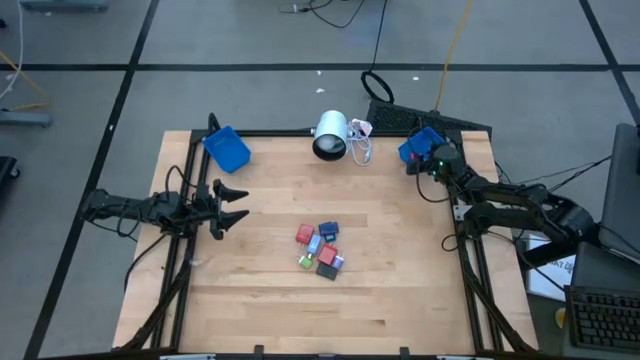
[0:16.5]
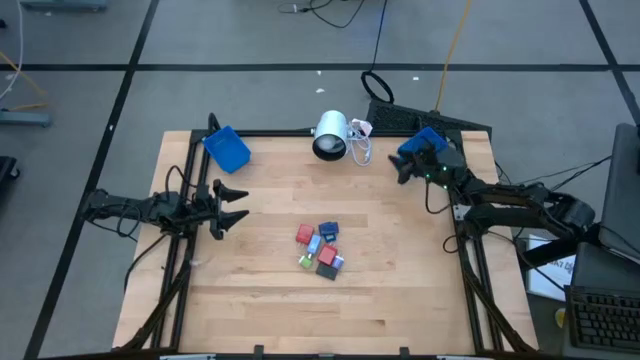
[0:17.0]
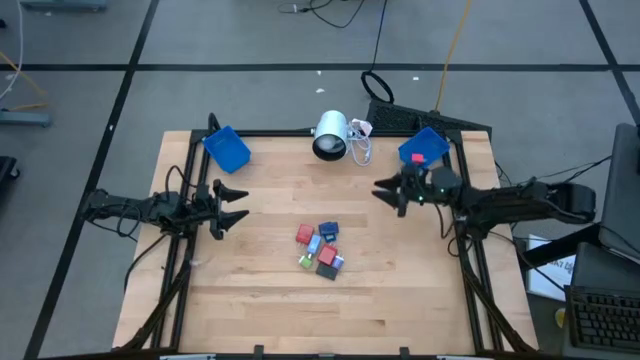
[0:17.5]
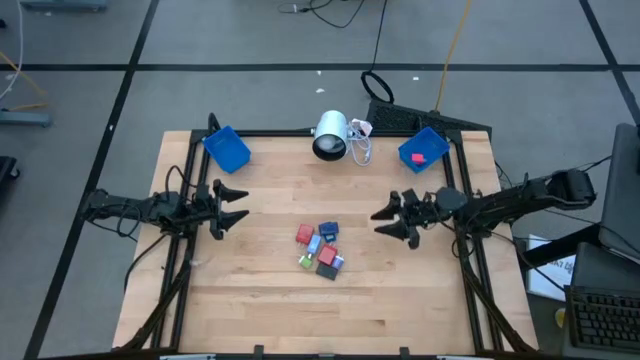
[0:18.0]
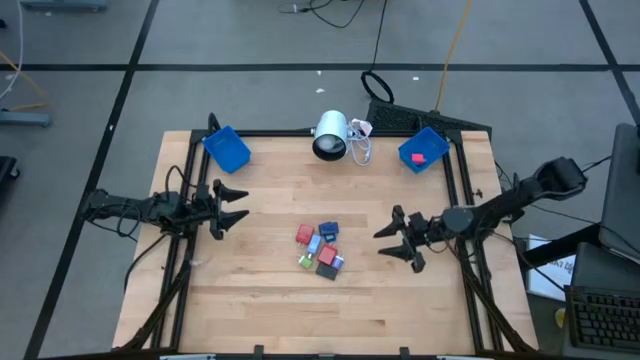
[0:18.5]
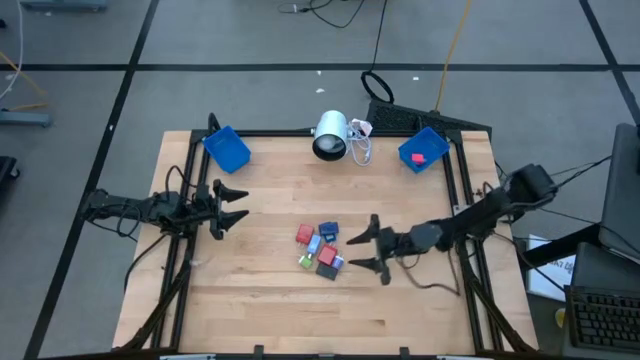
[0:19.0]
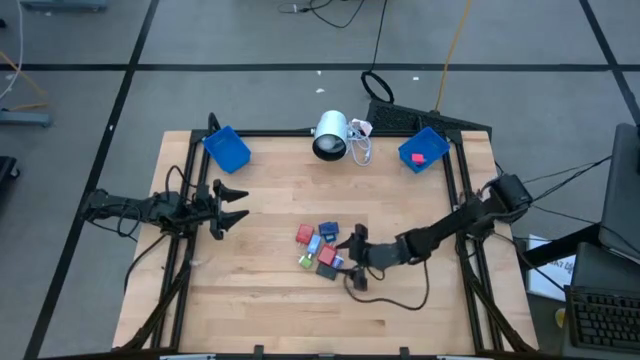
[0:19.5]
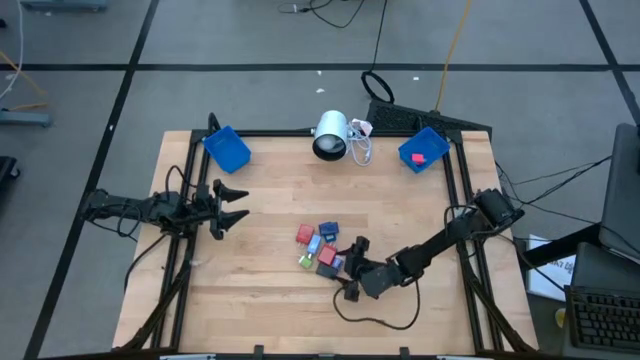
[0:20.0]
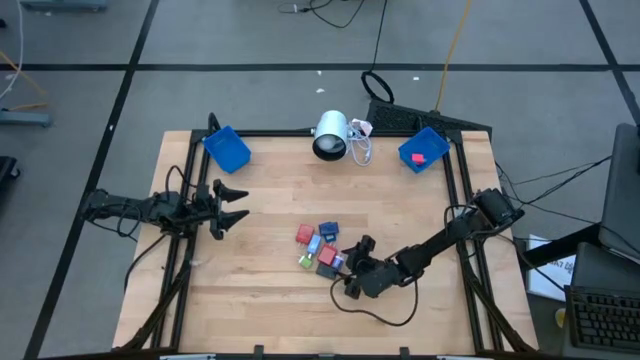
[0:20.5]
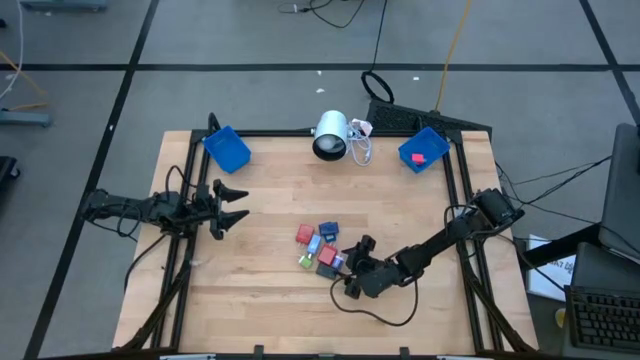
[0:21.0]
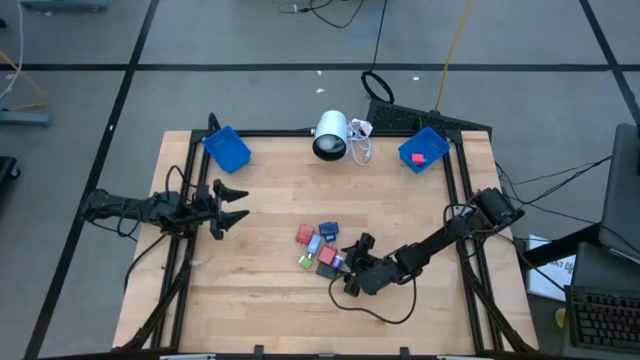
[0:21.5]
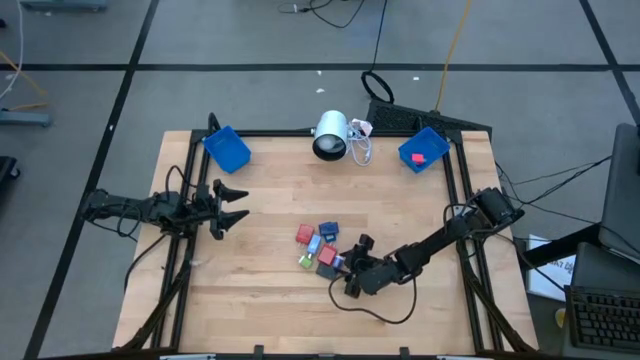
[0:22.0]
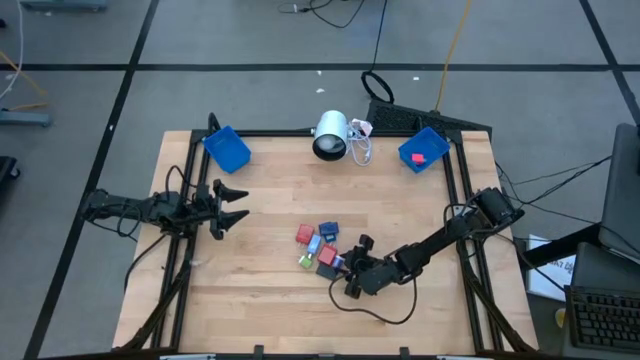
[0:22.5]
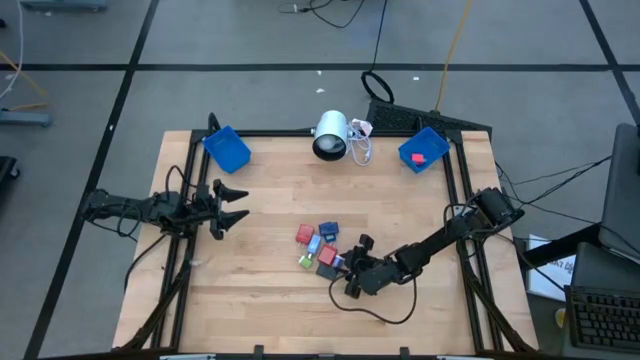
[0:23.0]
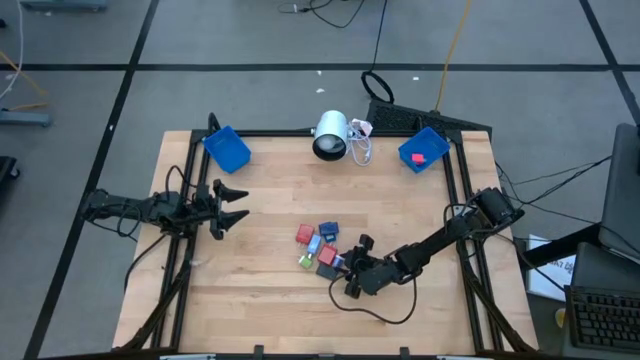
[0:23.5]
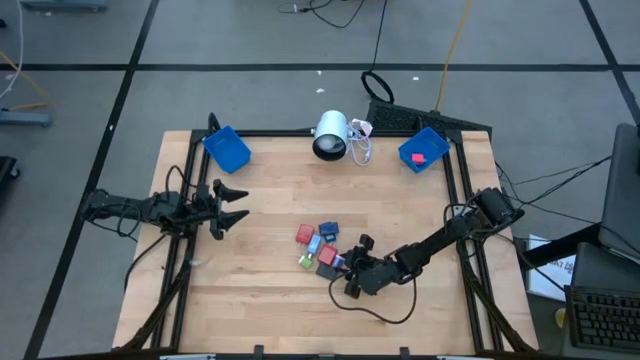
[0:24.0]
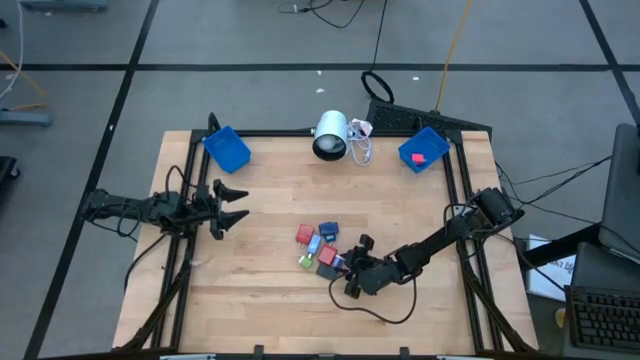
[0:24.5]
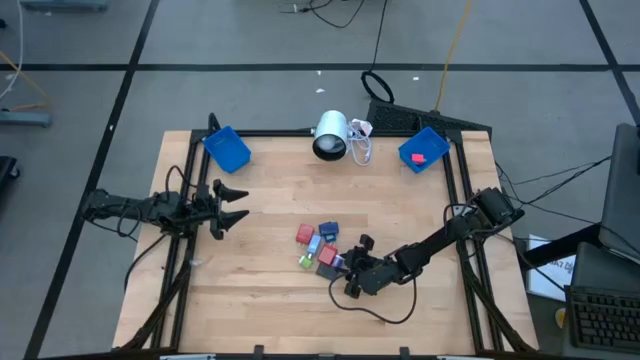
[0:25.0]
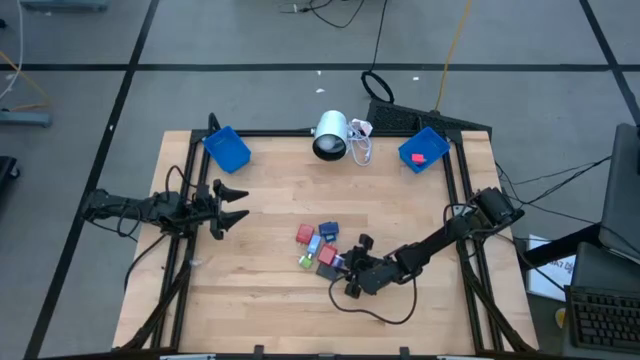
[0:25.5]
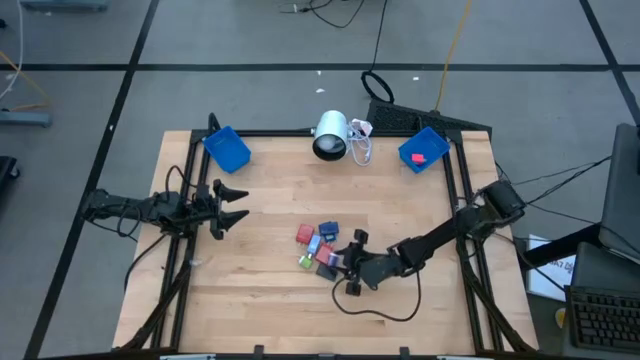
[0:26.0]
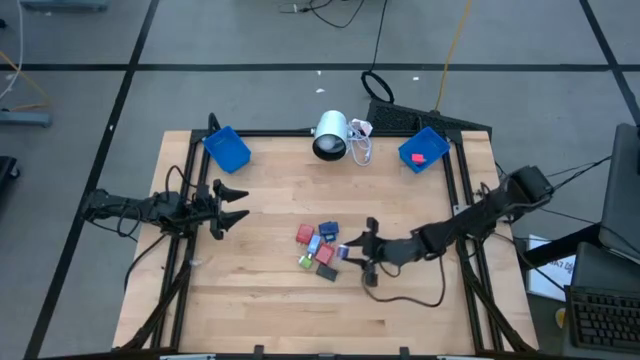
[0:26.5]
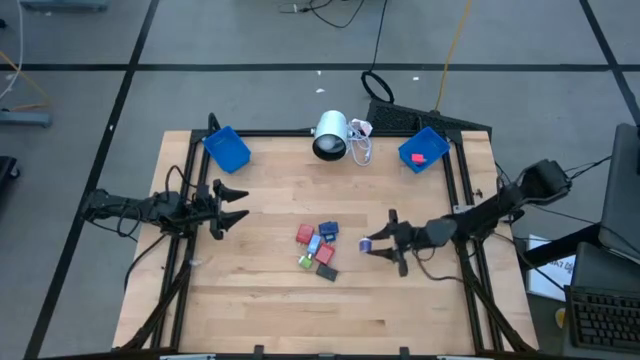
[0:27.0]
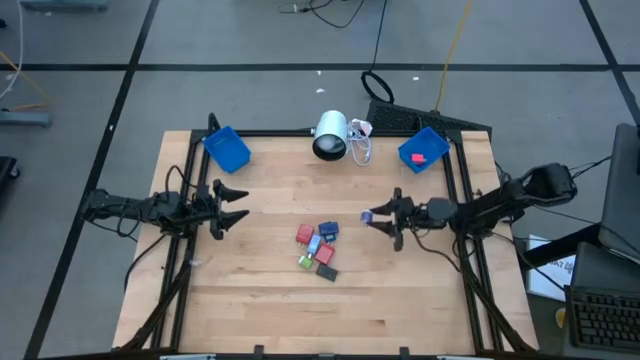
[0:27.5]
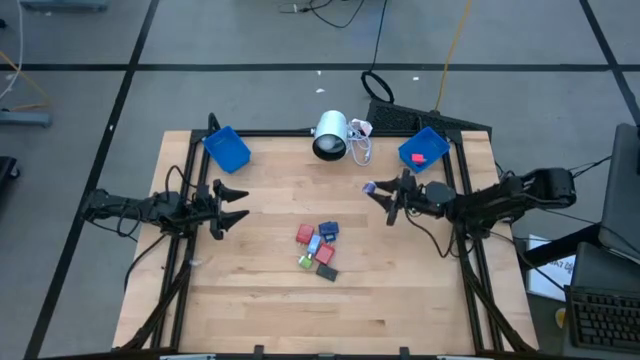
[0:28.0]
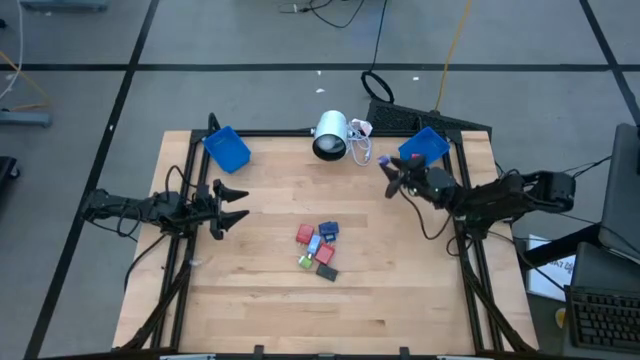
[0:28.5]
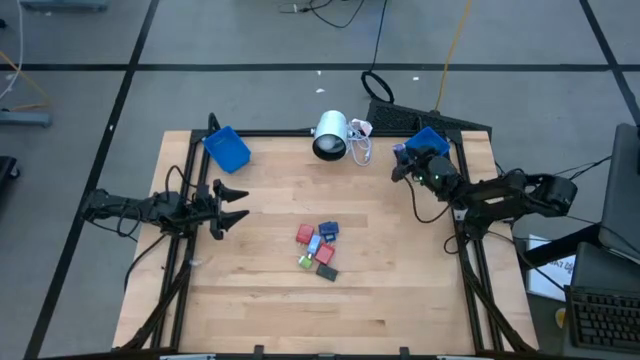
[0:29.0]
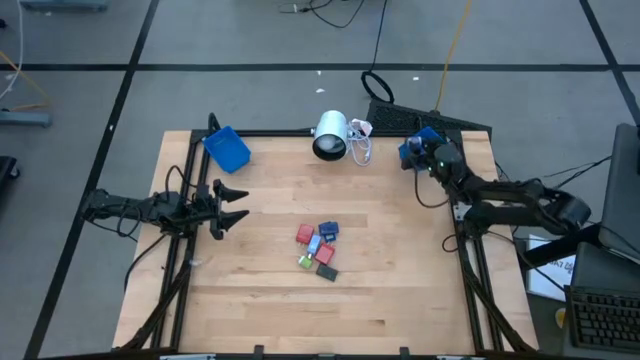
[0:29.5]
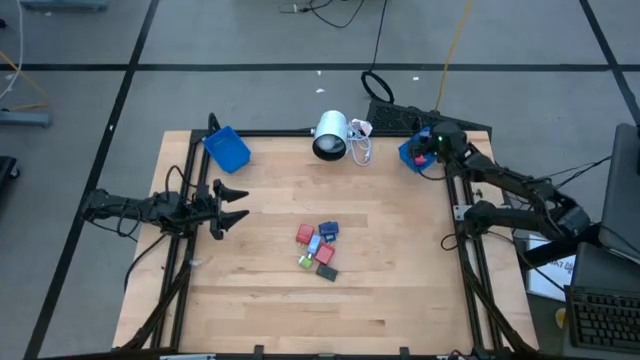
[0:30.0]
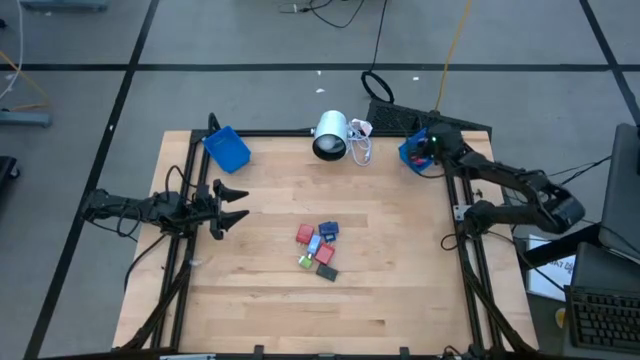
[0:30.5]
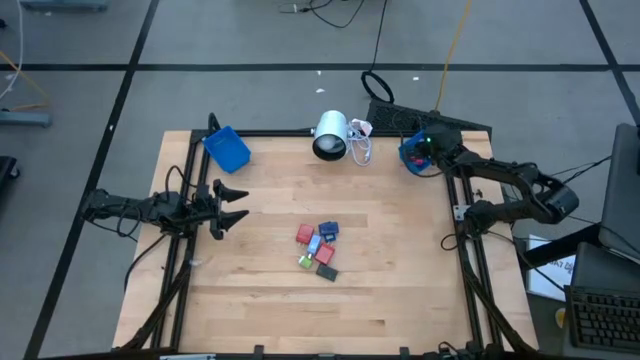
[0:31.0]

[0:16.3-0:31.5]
Task: Pick & Place Office items
Put the purple charger adapter into the right blue bin

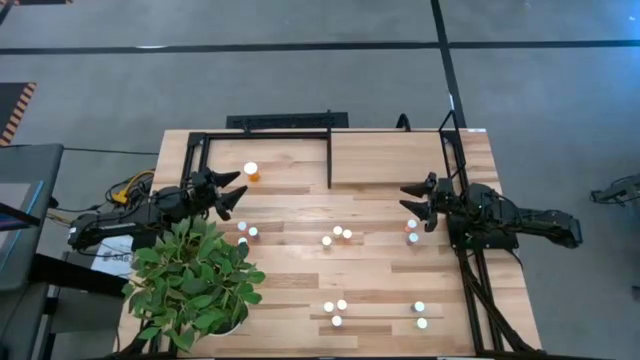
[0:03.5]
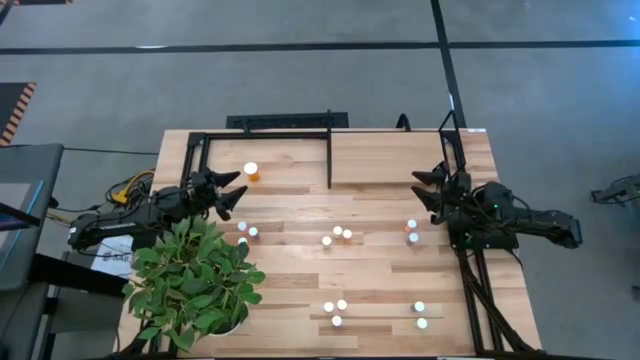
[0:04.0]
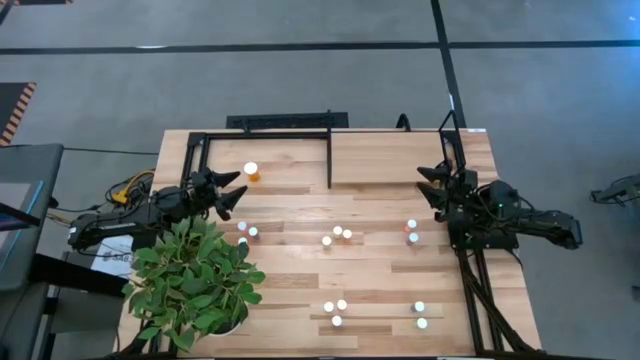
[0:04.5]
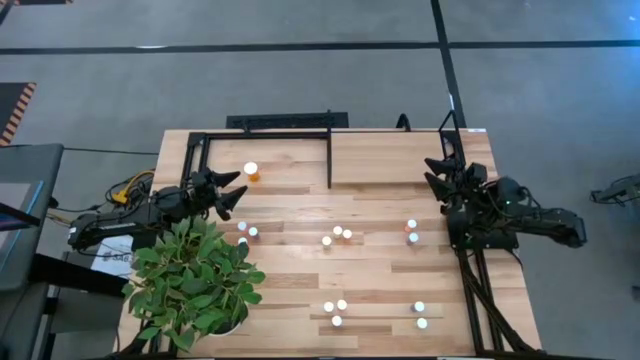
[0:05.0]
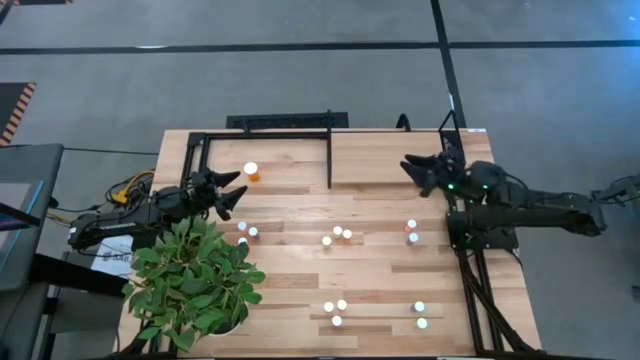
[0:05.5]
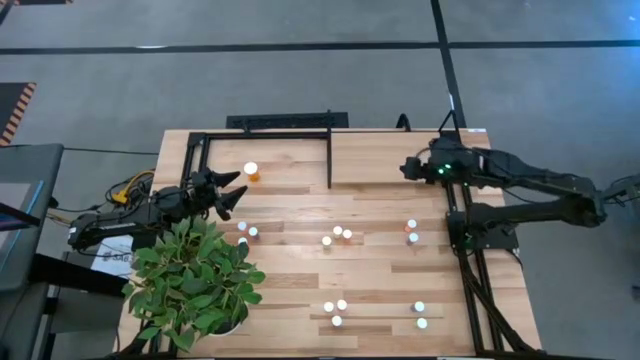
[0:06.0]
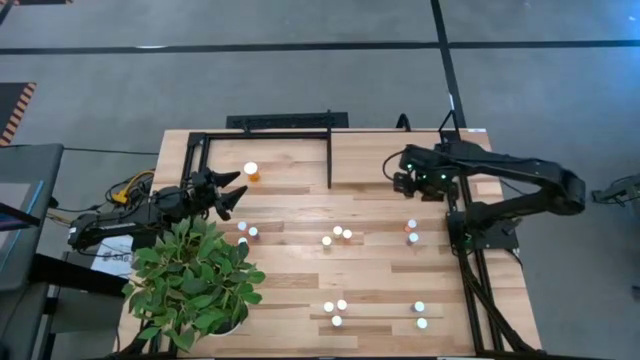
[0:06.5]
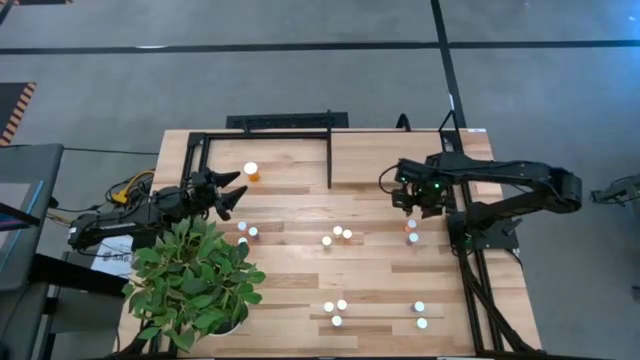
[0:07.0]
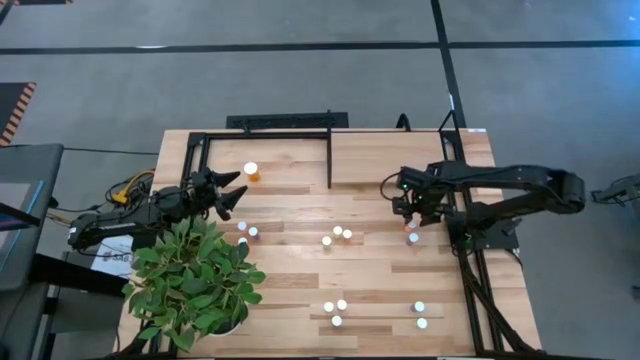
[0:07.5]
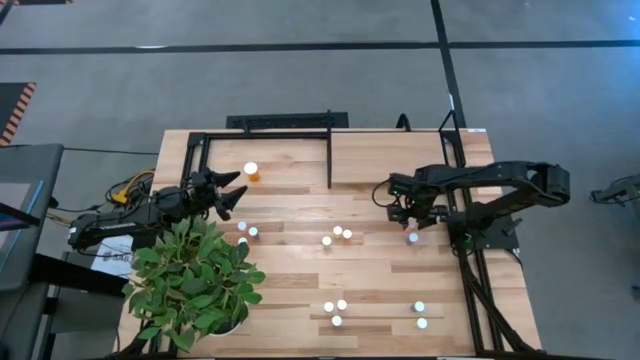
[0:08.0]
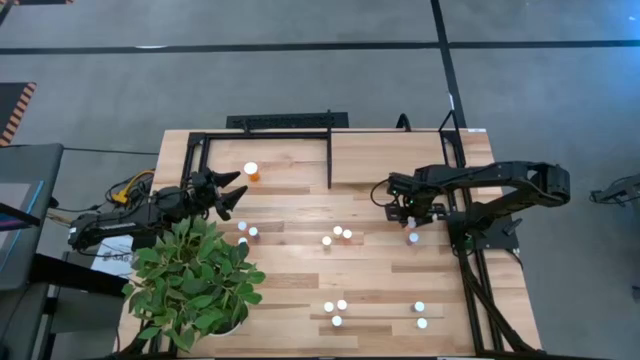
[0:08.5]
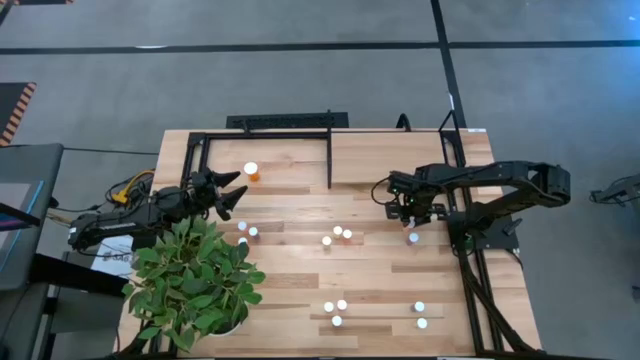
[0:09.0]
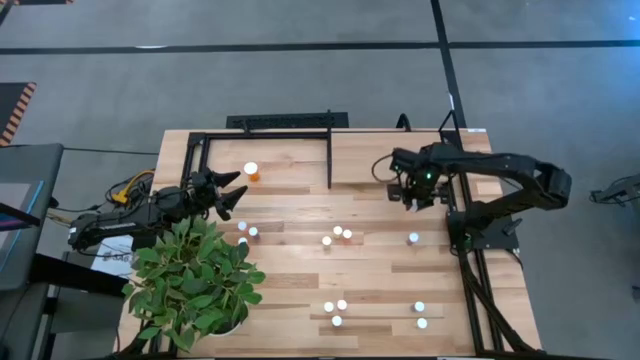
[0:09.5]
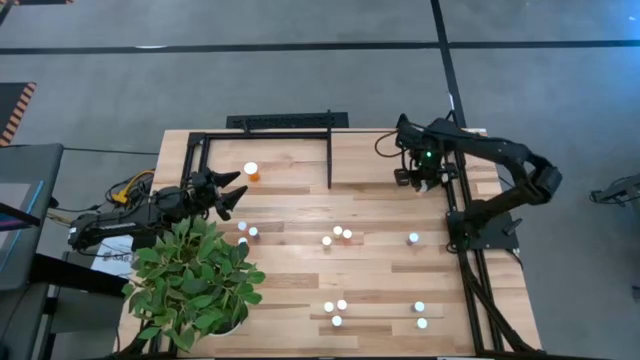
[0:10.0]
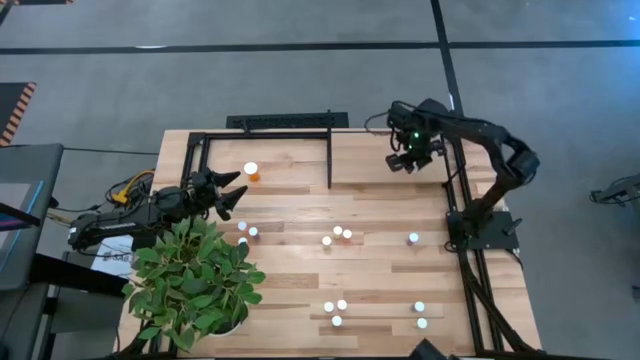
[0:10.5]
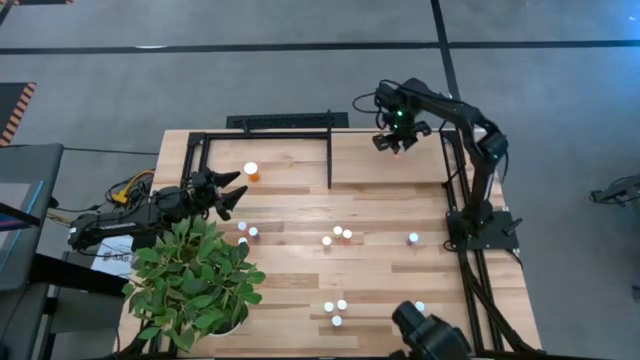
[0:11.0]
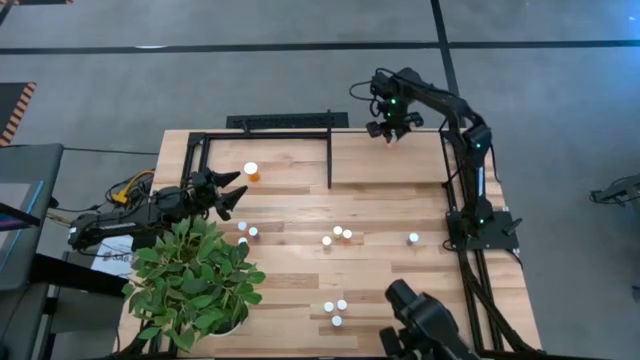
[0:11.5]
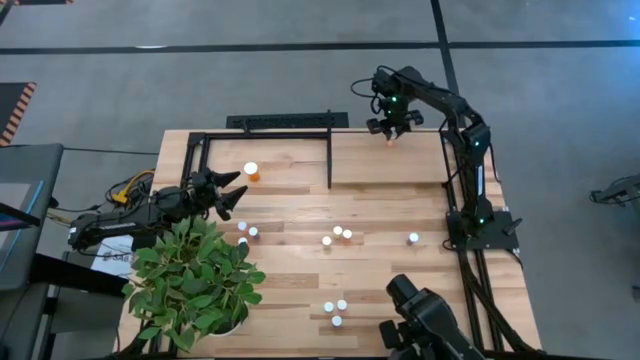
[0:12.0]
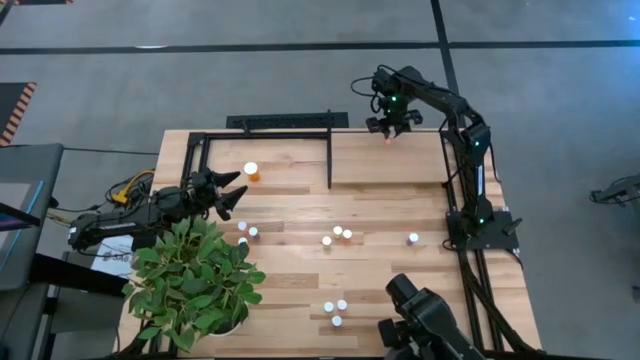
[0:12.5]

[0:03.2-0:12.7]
Task: Pick and place medicine bottles onto shelf by color
Put the pink pill bottle on the shelf
